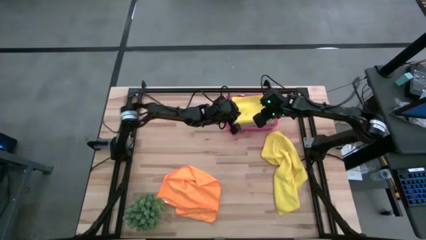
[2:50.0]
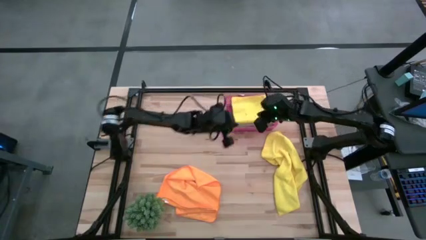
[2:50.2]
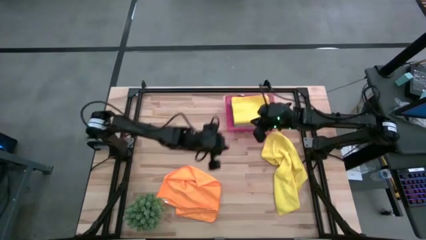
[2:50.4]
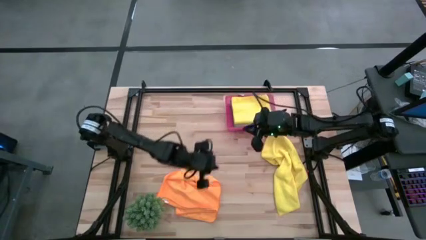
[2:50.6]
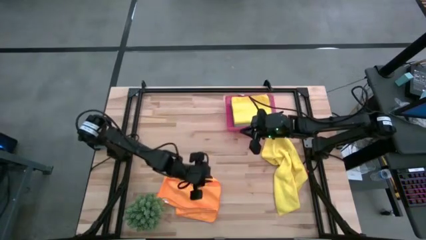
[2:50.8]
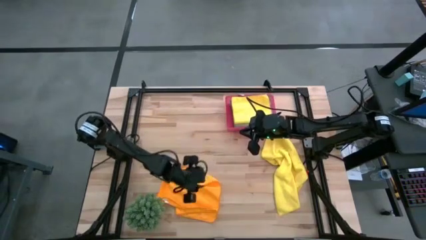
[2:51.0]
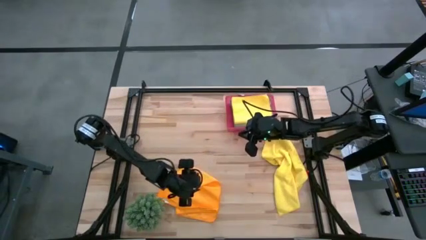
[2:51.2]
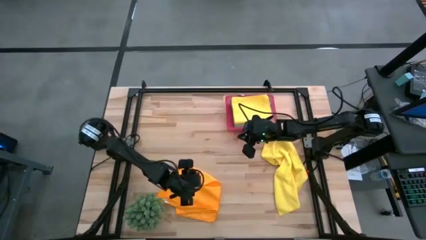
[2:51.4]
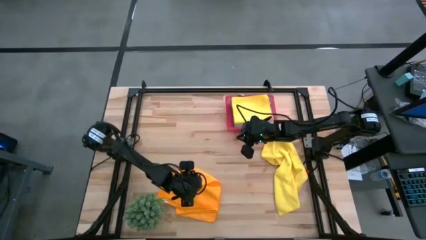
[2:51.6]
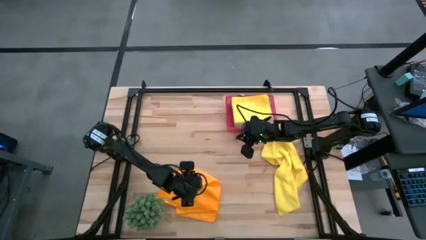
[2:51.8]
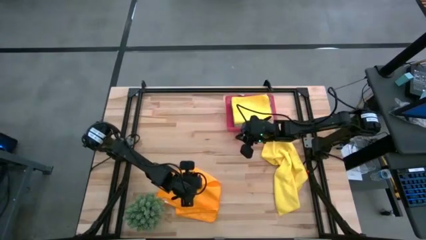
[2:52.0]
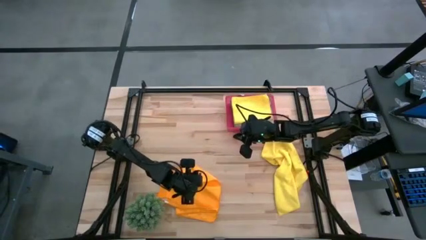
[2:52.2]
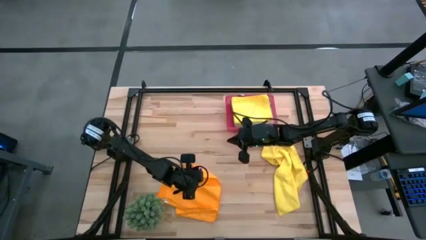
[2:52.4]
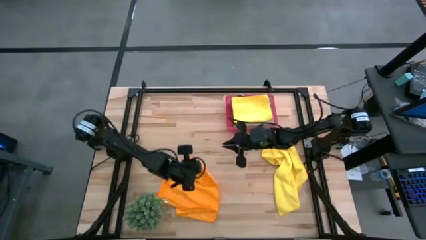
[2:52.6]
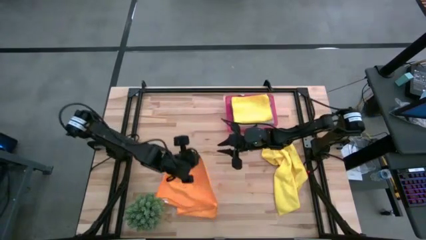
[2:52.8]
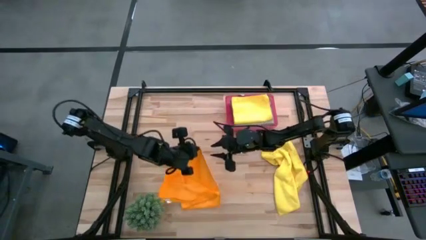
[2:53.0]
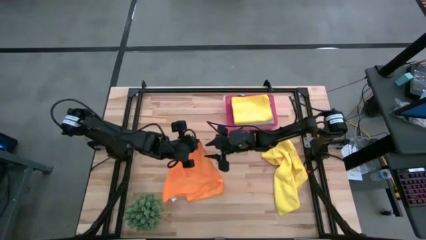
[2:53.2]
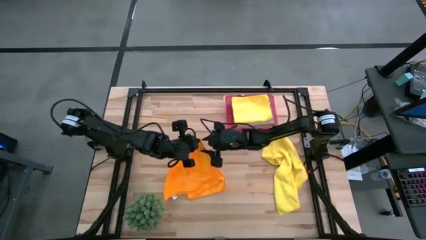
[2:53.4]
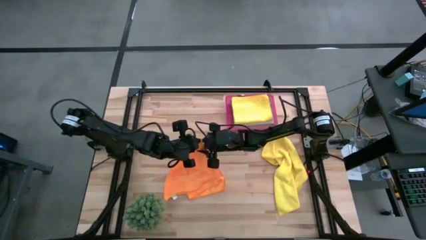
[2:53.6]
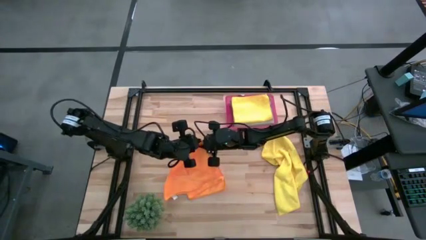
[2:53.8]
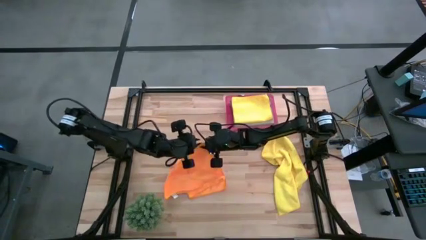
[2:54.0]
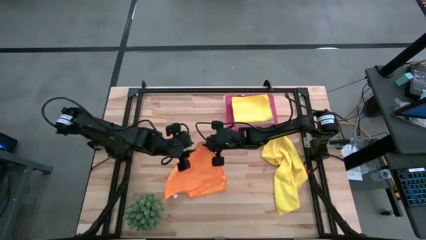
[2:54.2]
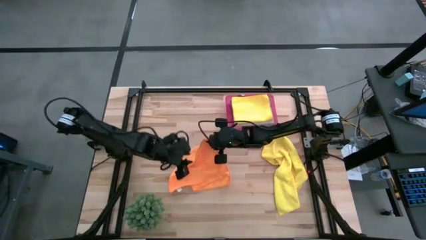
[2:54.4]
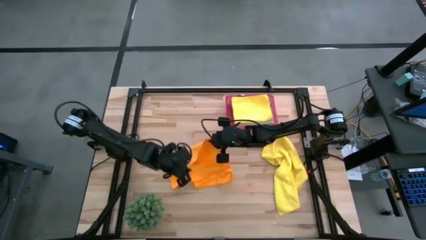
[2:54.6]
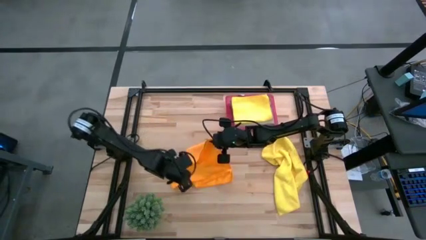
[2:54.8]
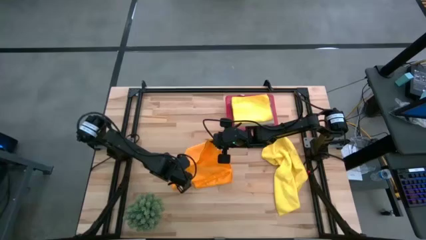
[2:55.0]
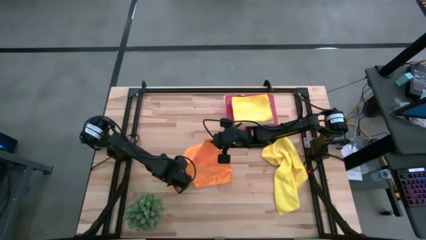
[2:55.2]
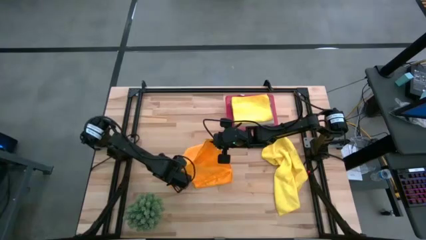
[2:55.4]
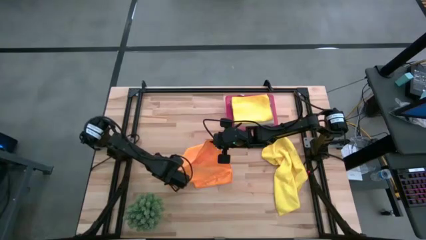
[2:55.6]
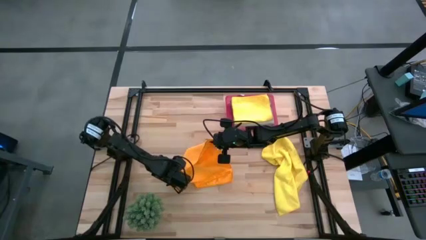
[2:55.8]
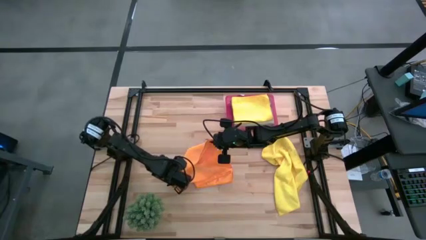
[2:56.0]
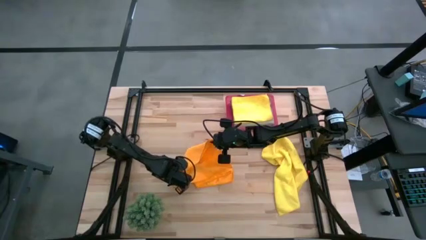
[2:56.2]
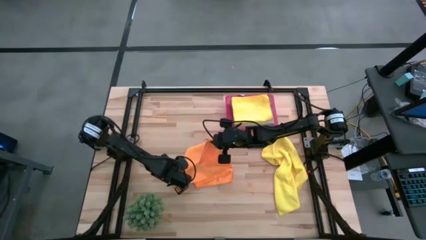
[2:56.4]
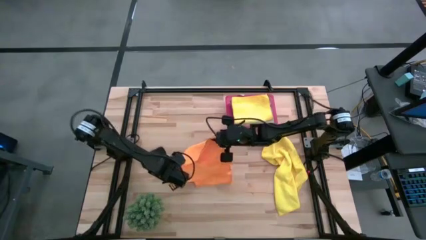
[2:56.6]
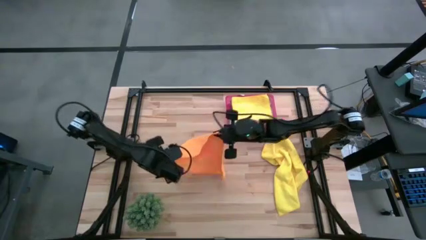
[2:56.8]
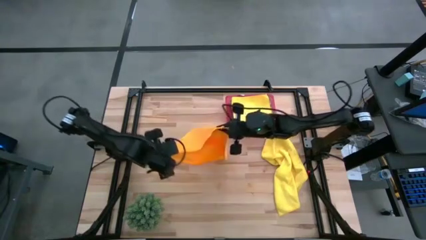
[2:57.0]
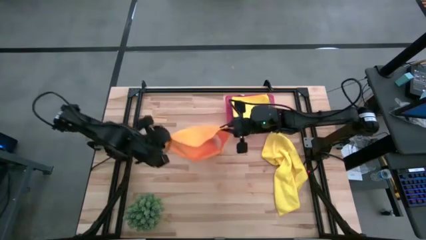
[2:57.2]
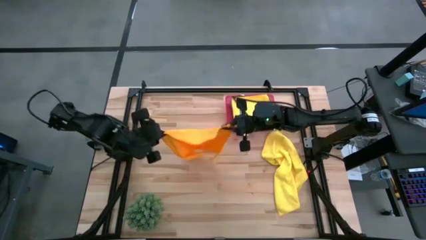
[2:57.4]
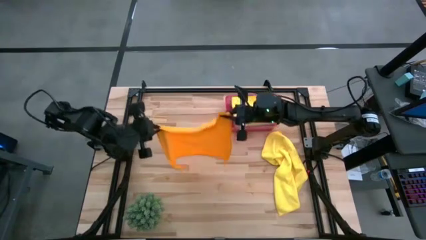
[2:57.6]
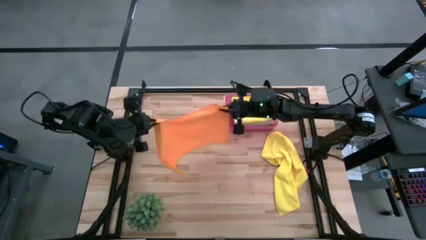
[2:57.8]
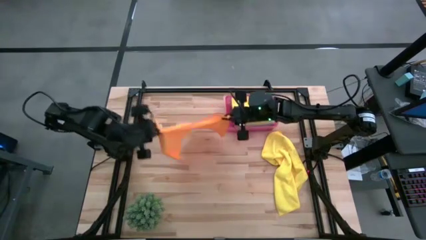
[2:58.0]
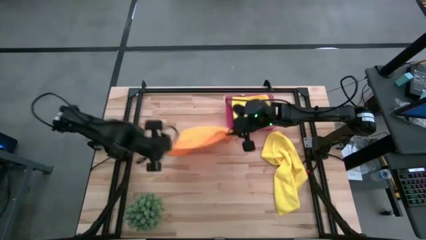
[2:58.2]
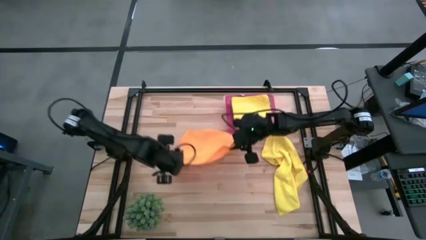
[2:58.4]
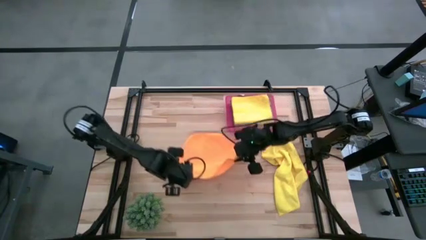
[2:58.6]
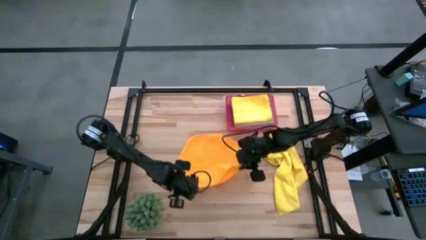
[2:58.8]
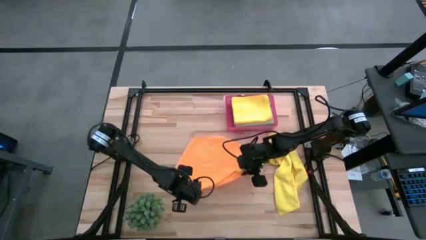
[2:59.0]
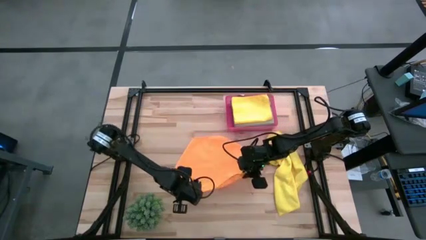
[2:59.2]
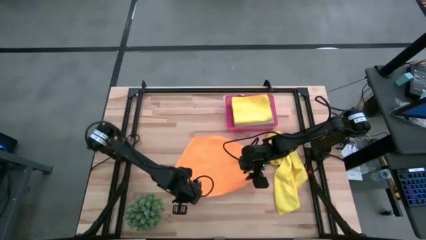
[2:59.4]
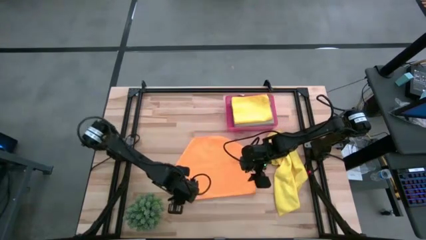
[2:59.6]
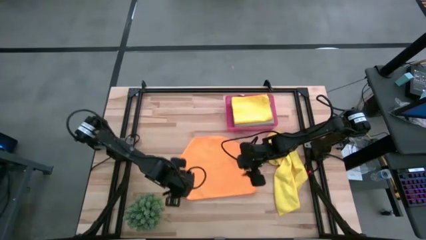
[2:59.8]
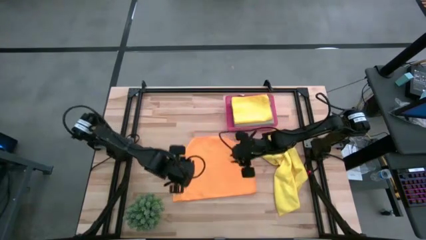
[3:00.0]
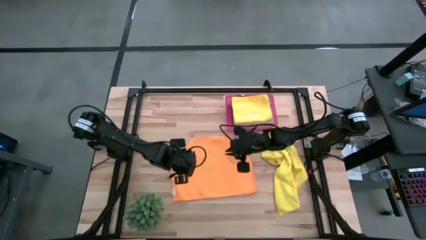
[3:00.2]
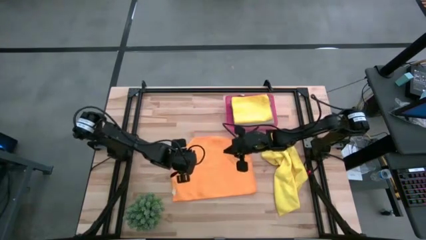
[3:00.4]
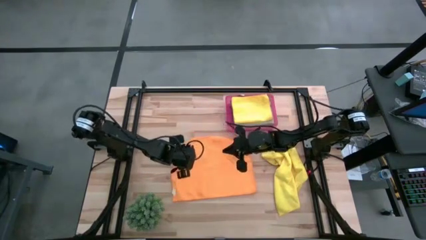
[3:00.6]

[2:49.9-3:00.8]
Task: Fold microfiber towels
Fold the orange microfiber cloth

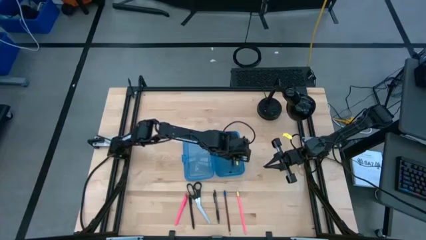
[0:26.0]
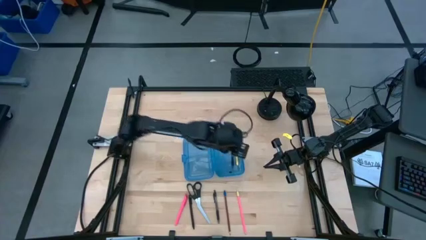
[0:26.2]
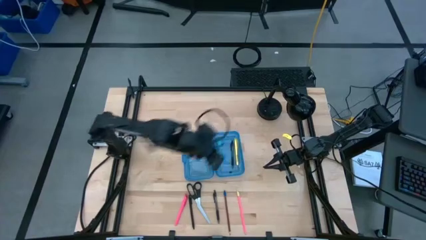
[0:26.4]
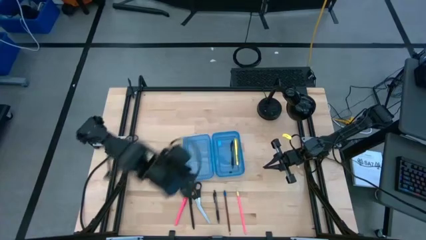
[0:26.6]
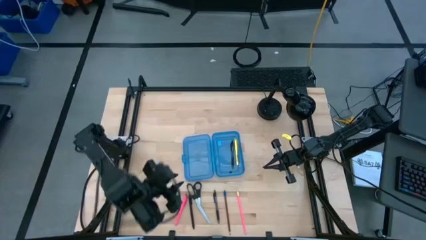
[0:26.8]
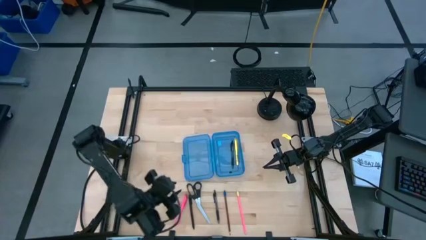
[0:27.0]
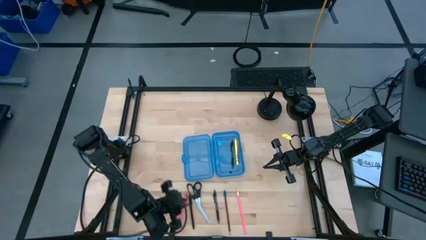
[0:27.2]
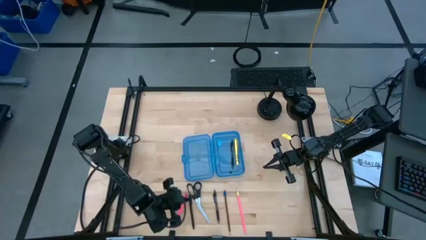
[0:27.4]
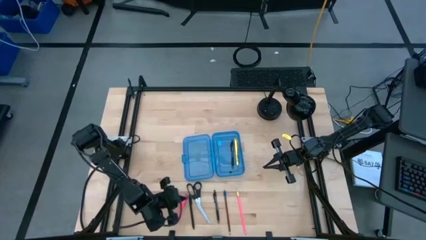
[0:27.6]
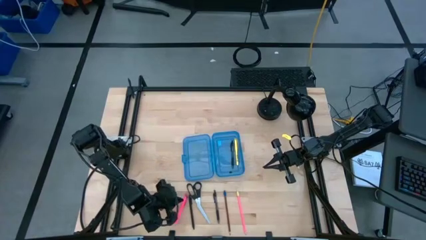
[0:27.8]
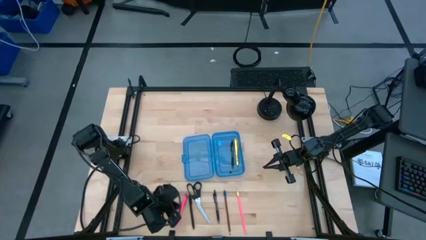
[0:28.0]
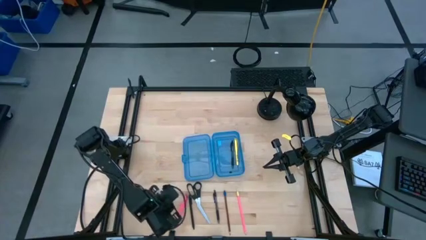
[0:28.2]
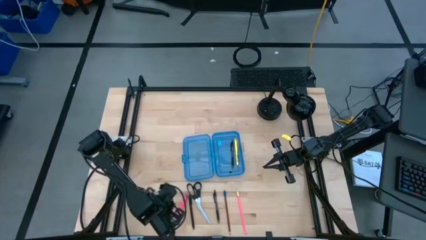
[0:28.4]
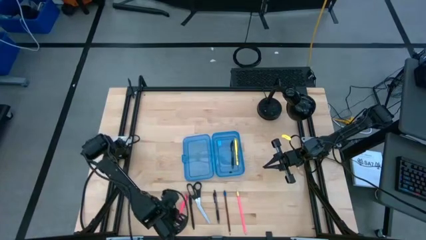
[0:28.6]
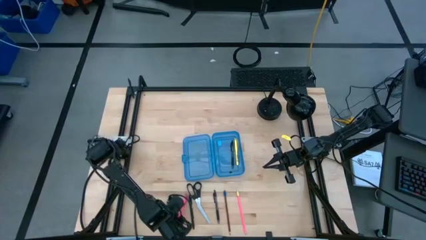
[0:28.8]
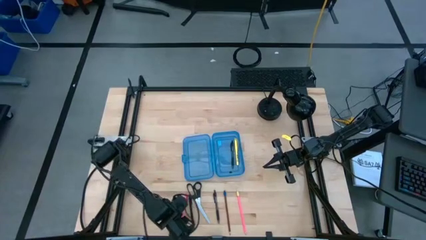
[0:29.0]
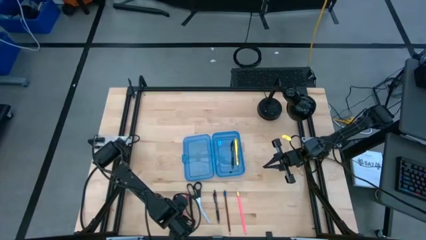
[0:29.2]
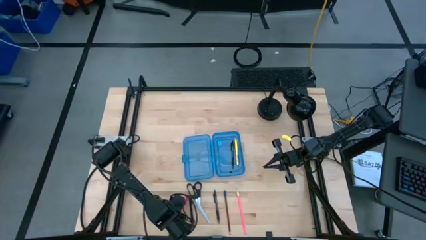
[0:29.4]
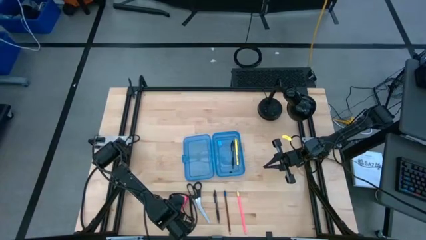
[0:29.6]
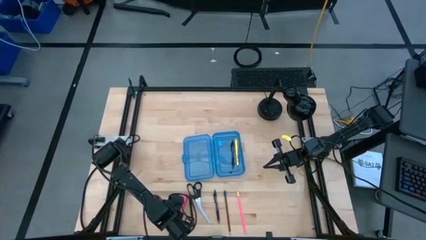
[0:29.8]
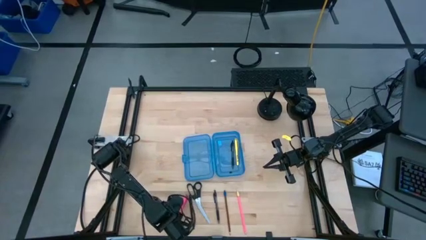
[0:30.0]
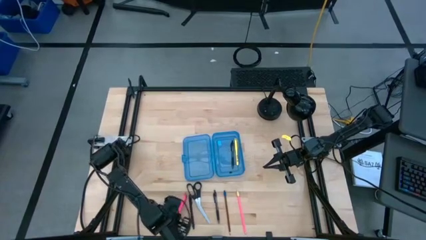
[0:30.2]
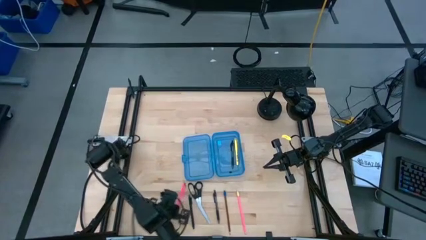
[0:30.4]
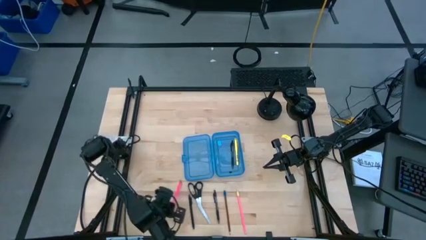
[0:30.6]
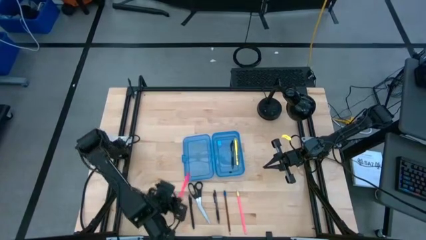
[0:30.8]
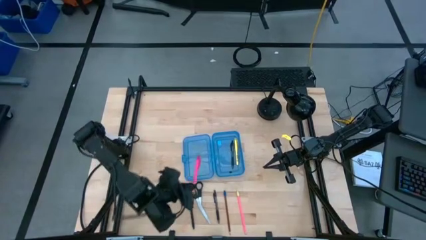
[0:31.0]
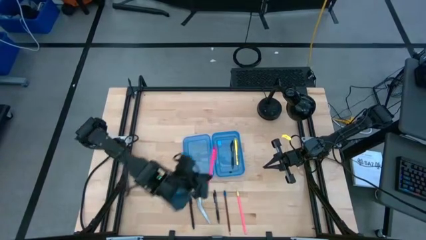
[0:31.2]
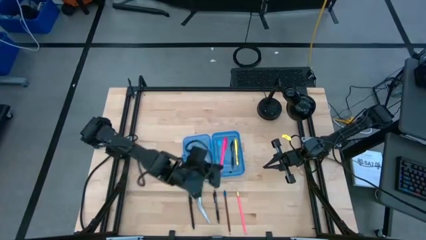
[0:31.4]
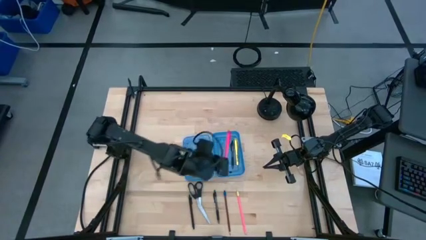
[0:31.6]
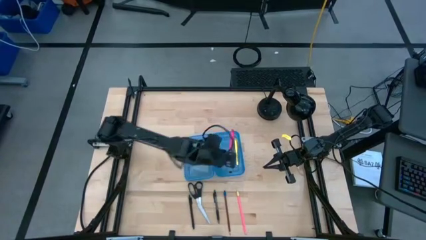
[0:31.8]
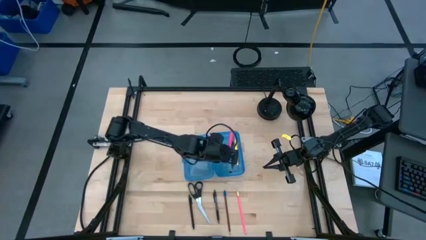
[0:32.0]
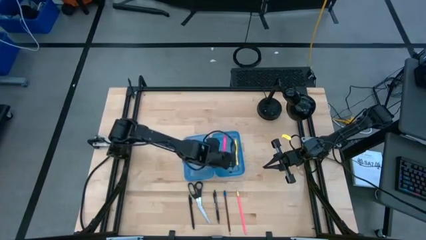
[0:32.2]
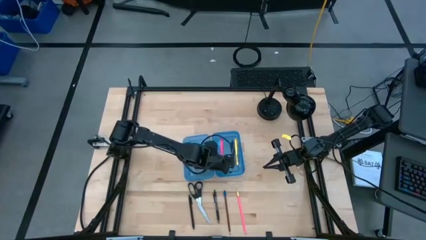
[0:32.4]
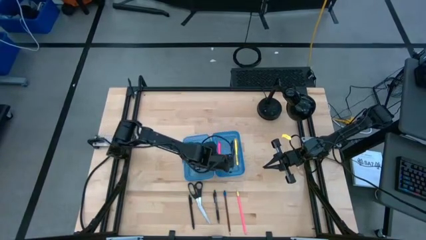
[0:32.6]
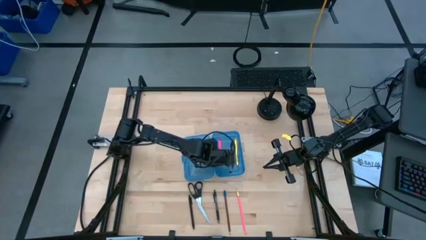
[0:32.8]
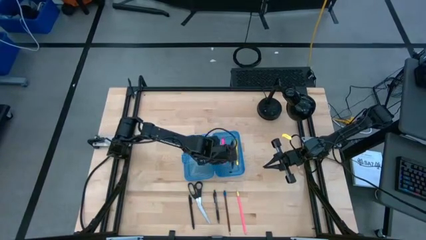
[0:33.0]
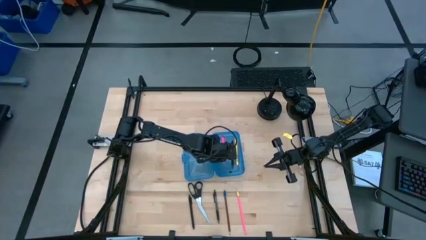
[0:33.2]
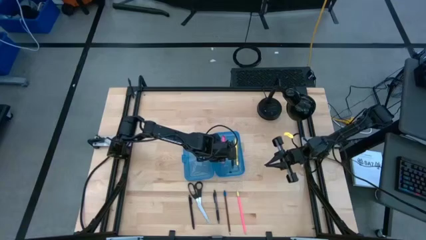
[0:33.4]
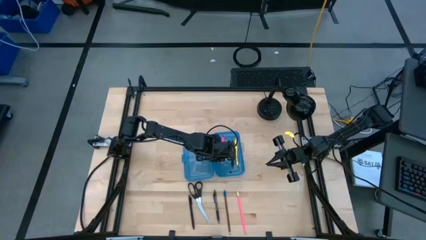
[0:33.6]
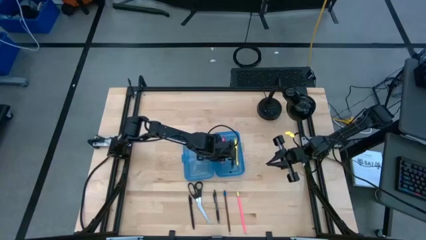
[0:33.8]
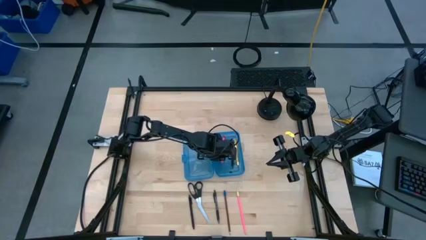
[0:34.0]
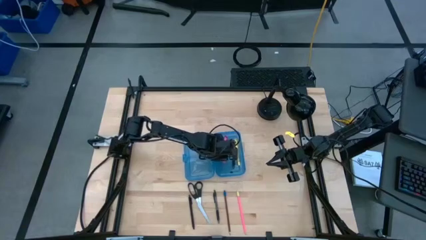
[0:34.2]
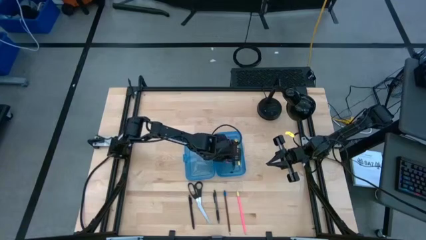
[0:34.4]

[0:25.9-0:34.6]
Task: Pick & place school supplies into a supply box
Put the pink pen into the blue supply box
